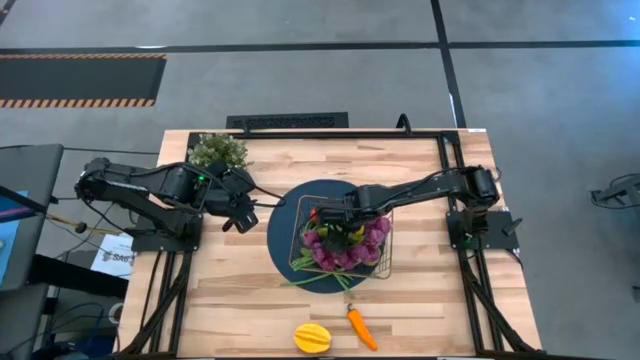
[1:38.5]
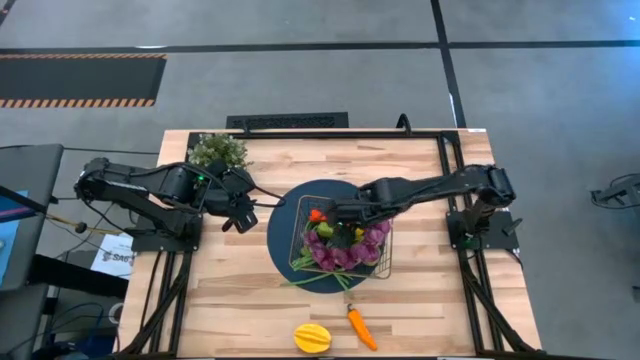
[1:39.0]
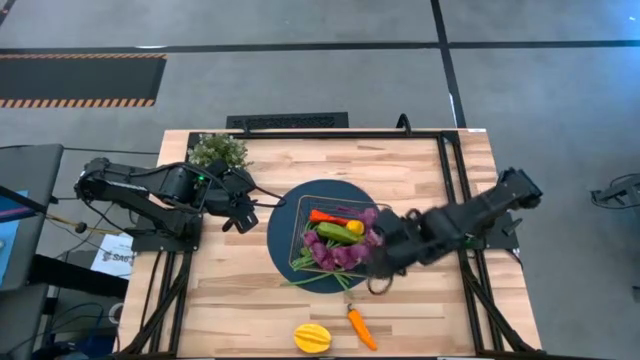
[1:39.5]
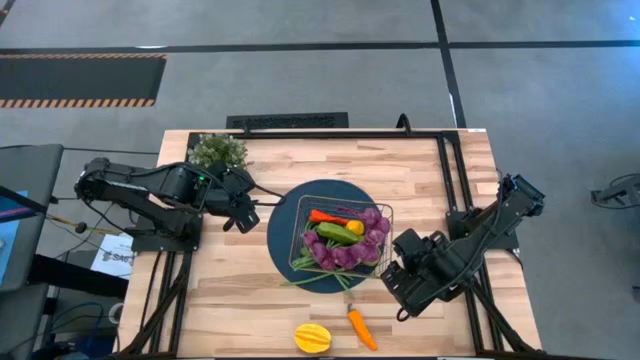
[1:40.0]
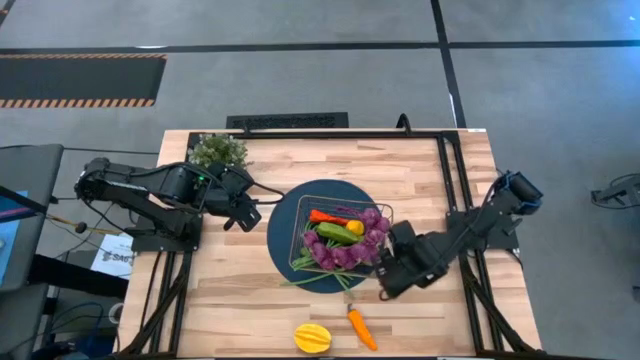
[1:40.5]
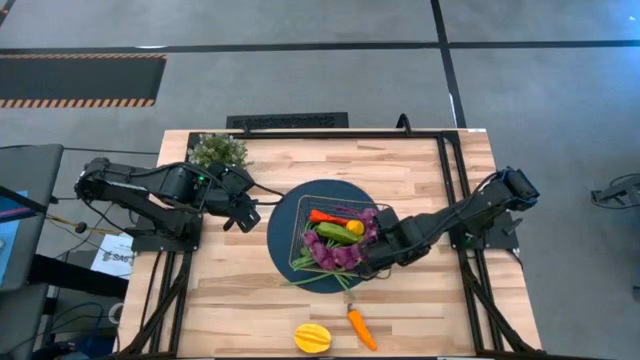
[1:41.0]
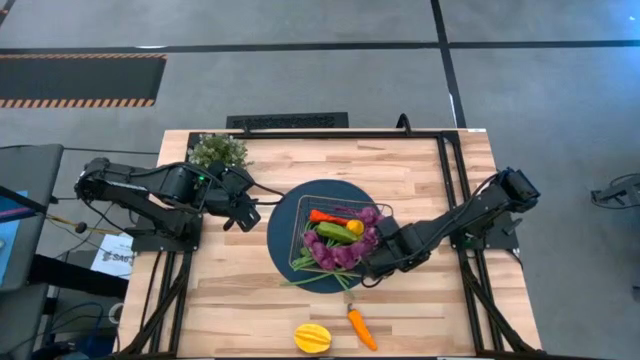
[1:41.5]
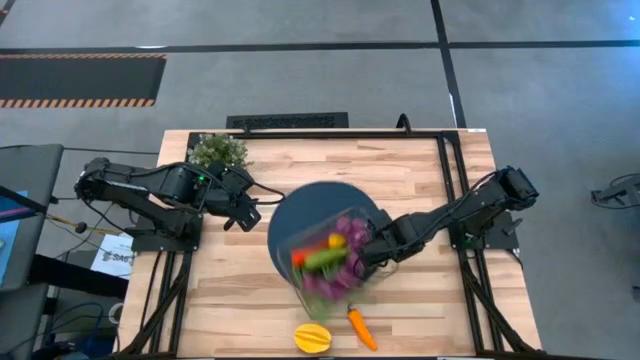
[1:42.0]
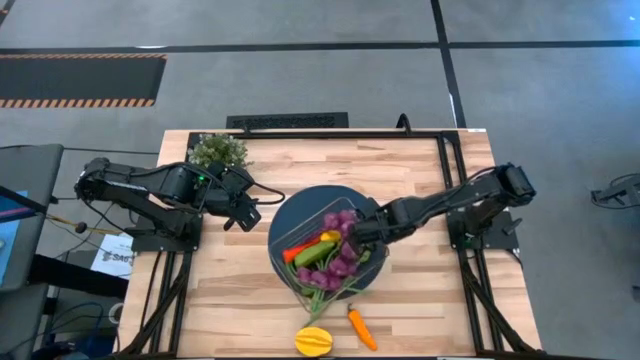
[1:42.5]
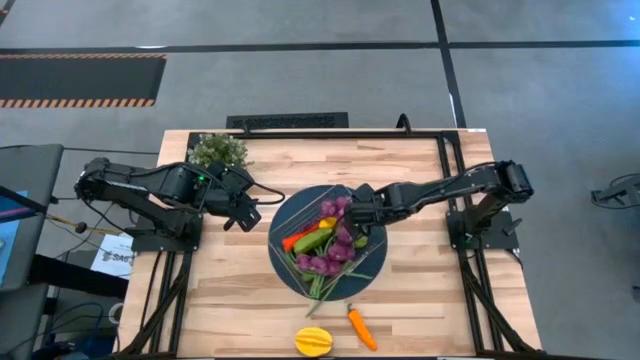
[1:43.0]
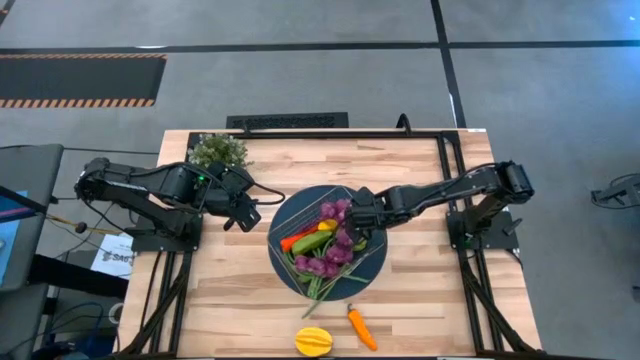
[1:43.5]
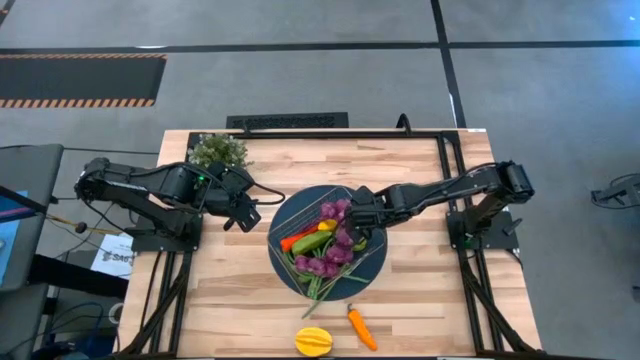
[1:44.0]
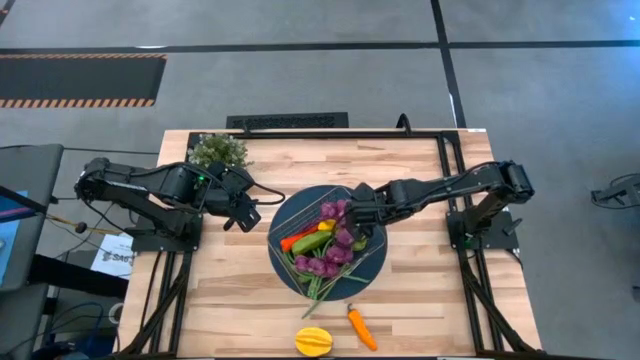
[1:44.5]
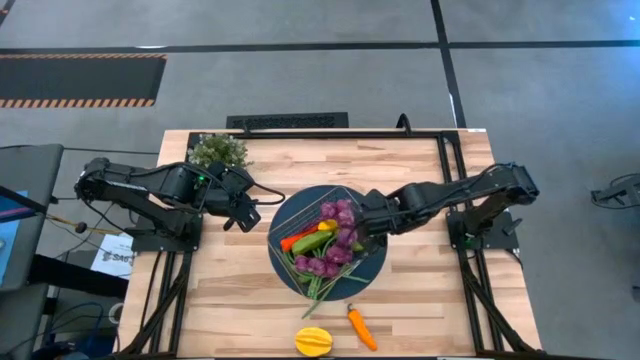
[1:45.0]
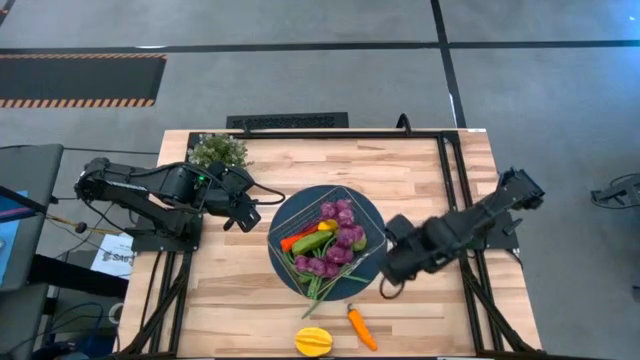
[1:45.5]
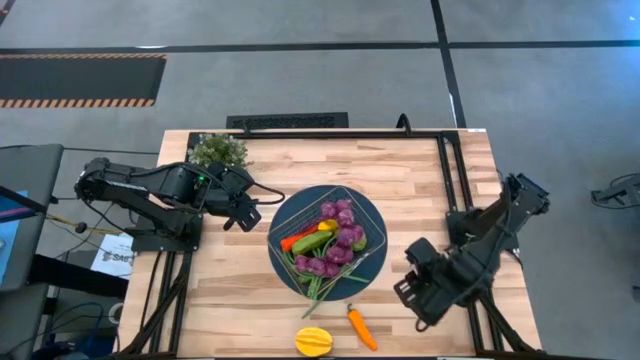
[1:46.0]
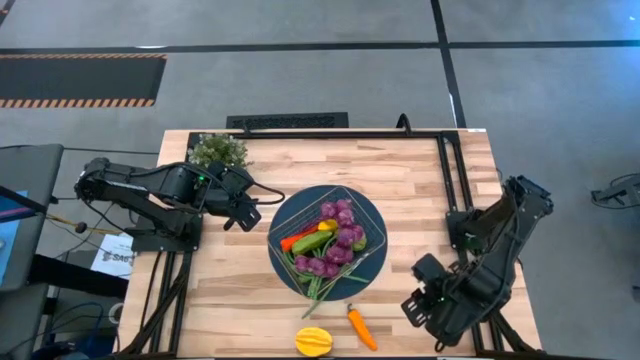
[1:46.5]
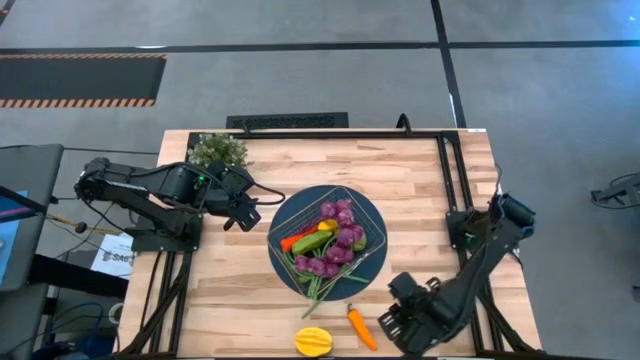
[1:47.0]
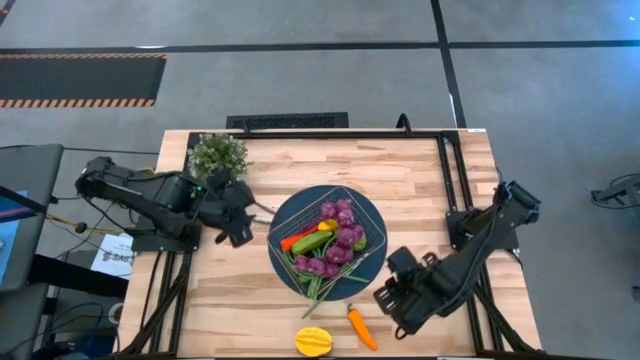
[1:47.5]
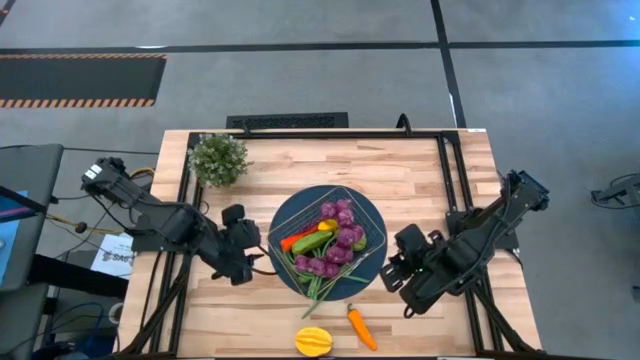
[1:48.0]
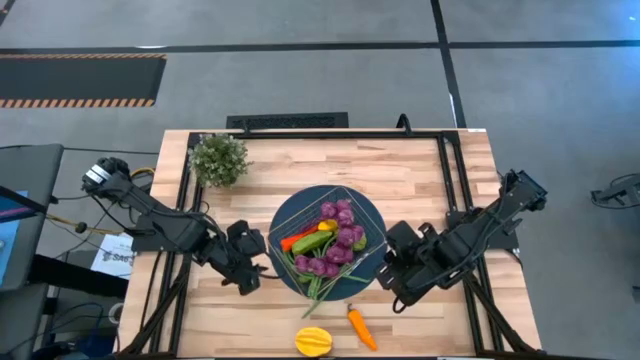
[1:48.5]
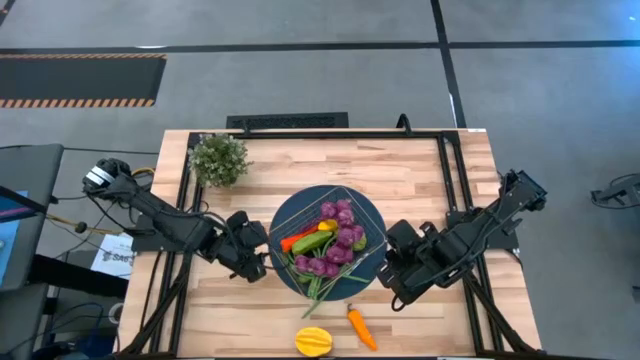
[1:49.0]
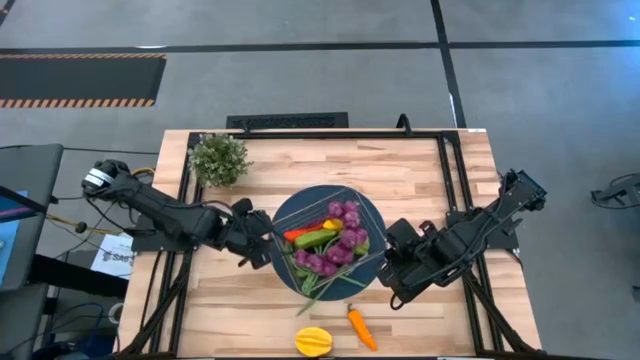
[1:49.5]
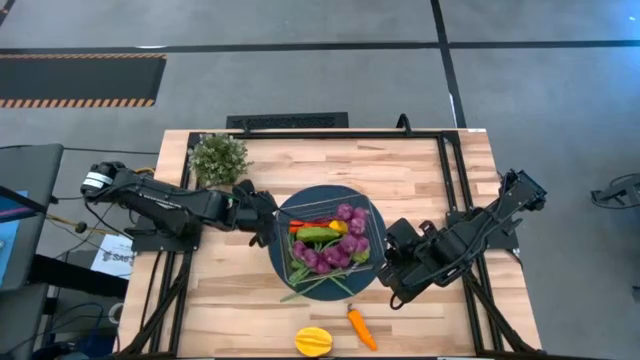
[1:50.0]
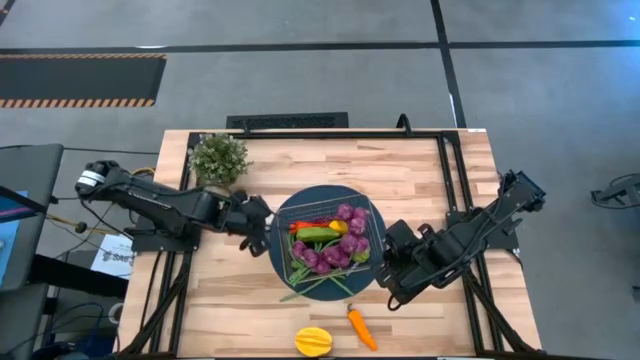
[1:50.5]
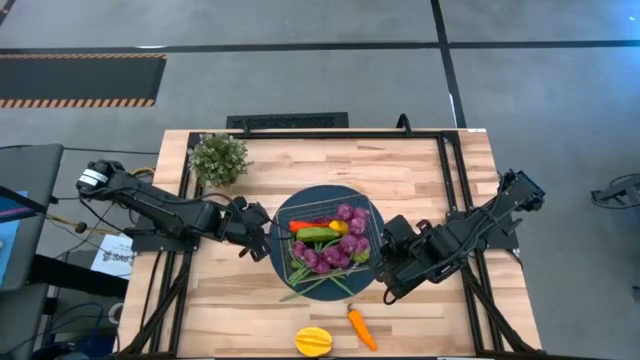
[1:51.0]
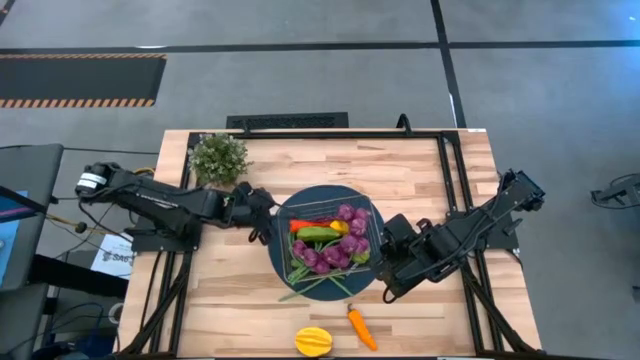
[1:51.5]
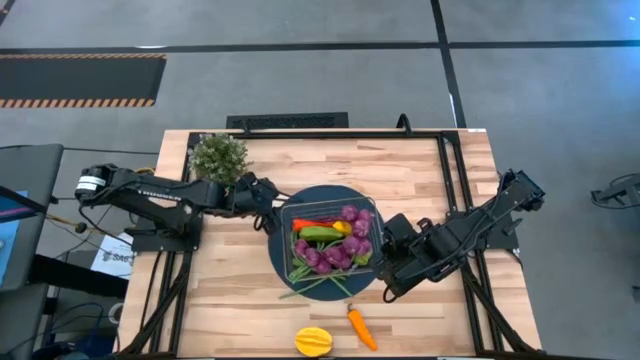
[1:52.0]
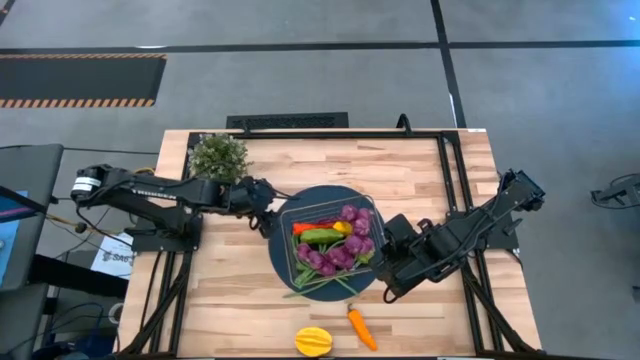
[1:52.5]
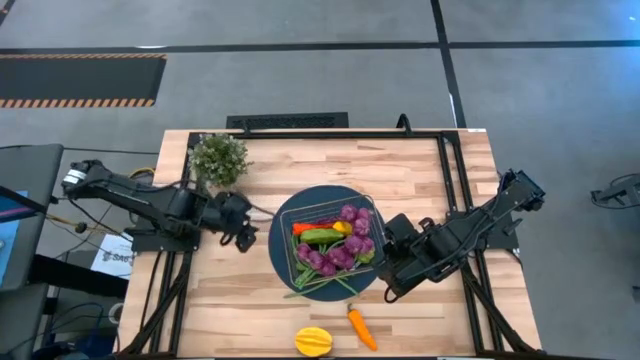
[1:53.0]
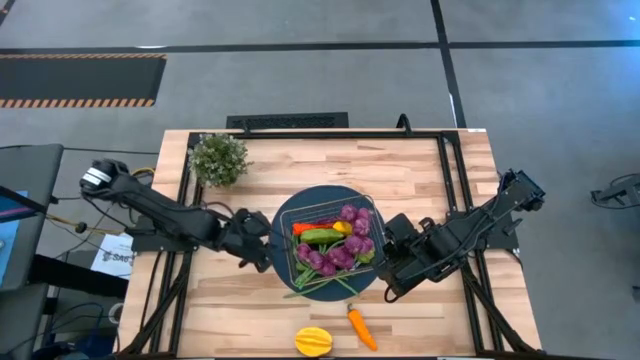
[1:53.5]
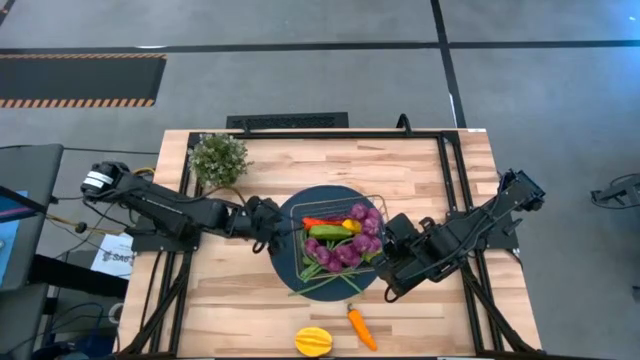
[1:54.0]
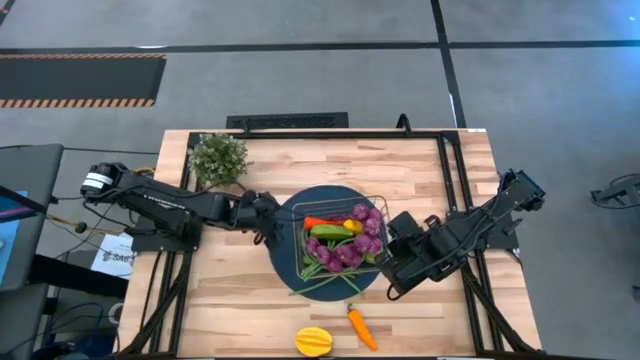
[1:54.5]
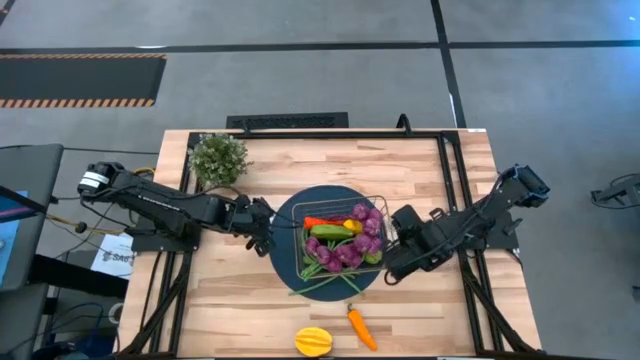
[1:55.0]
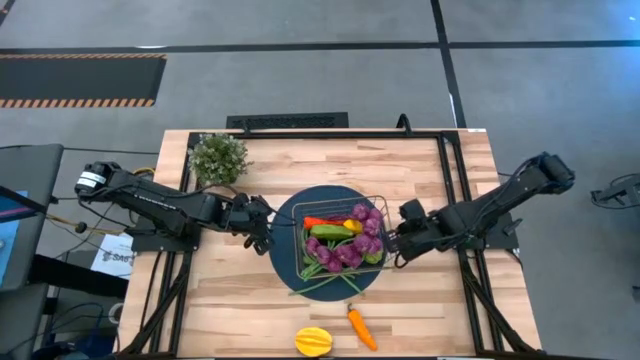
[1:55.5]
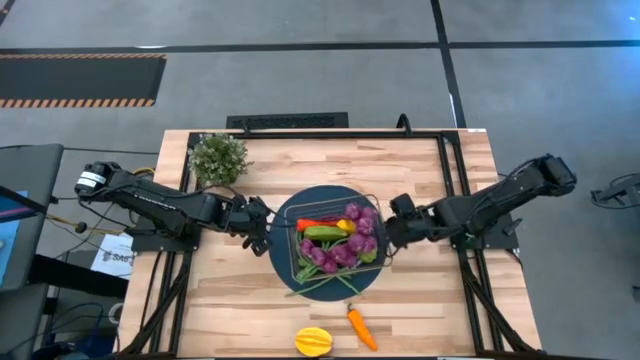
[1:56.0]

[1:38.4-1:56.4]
Task: Build produce basket
Adjust the gold wire basket
